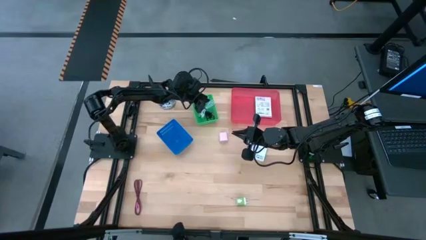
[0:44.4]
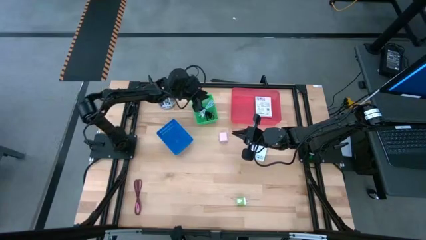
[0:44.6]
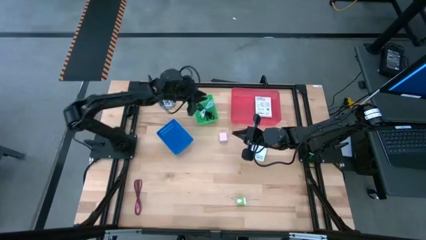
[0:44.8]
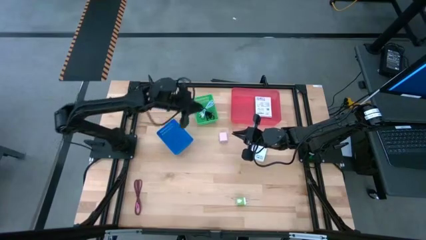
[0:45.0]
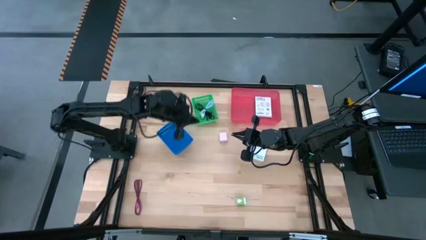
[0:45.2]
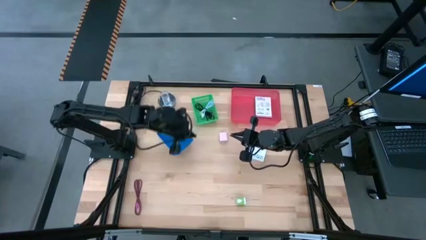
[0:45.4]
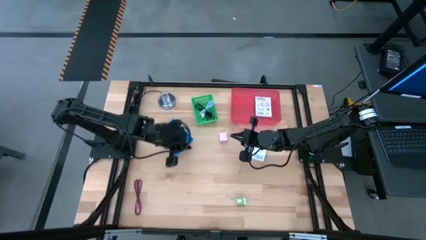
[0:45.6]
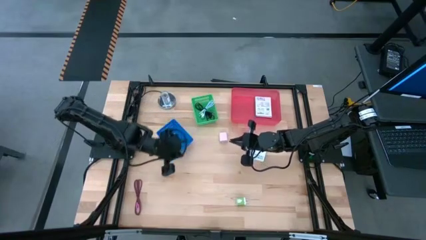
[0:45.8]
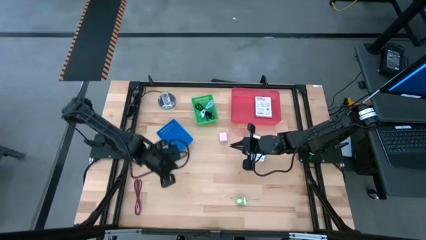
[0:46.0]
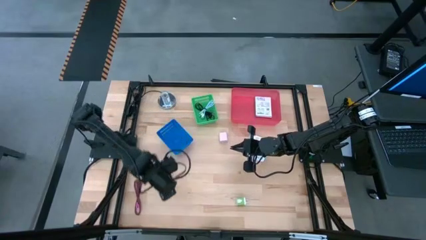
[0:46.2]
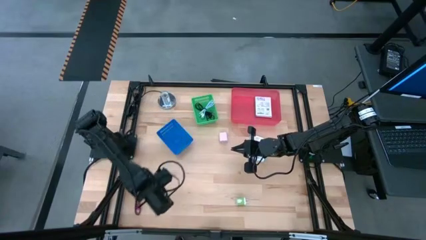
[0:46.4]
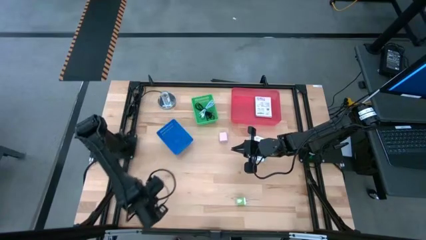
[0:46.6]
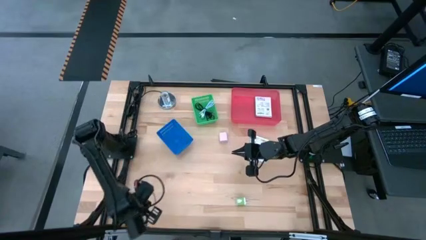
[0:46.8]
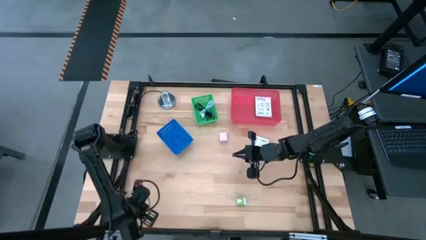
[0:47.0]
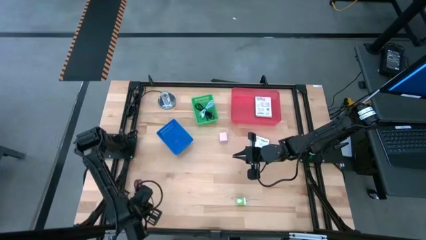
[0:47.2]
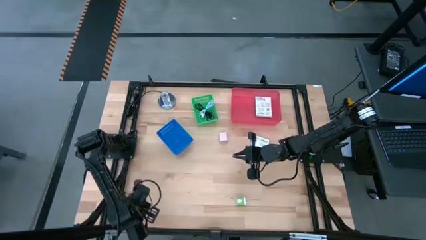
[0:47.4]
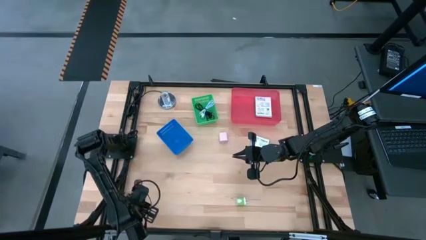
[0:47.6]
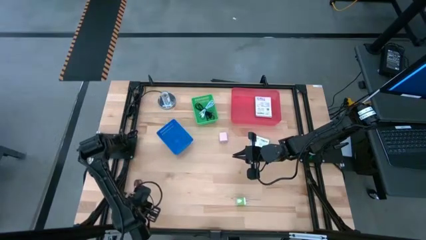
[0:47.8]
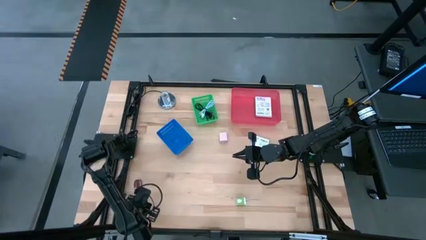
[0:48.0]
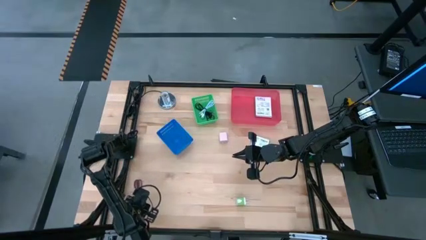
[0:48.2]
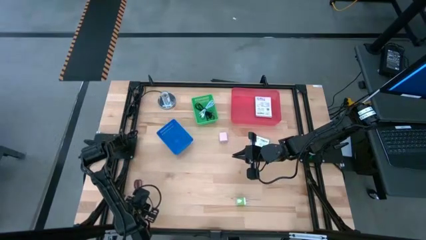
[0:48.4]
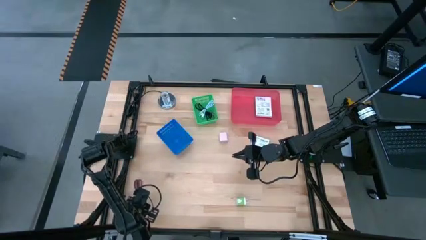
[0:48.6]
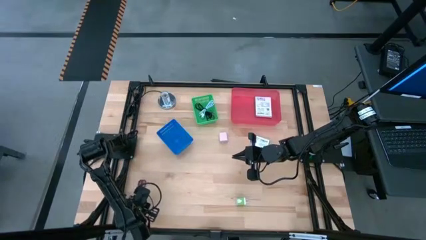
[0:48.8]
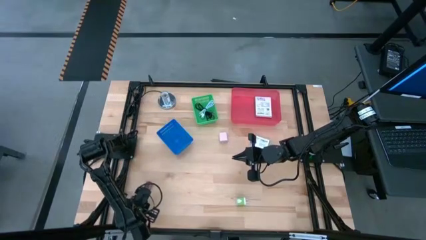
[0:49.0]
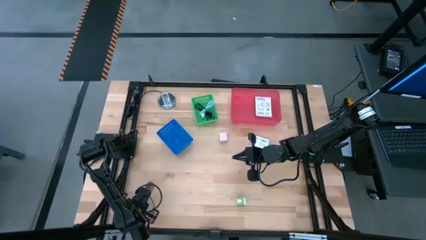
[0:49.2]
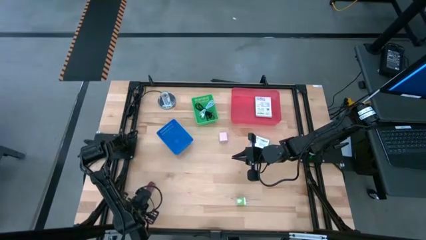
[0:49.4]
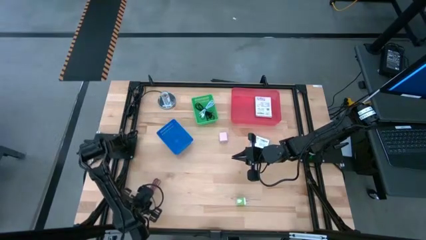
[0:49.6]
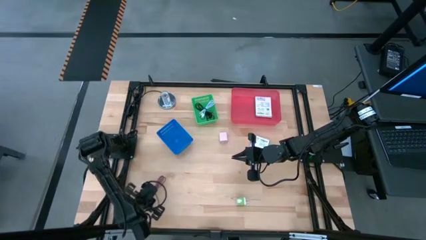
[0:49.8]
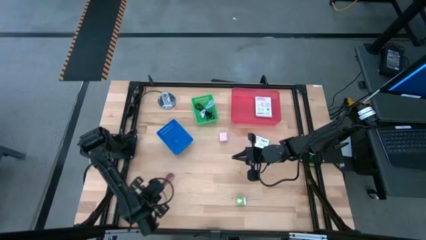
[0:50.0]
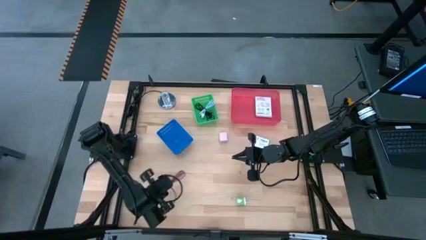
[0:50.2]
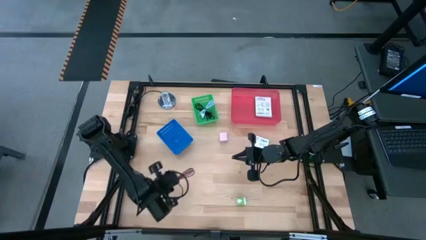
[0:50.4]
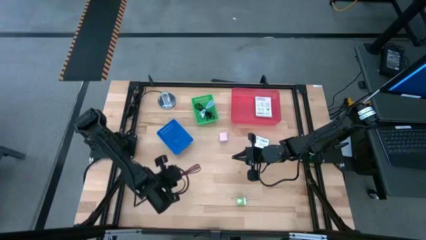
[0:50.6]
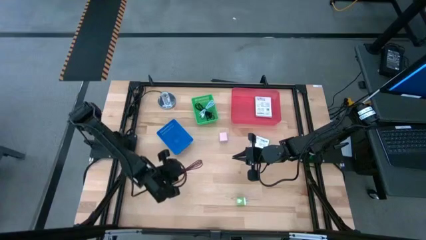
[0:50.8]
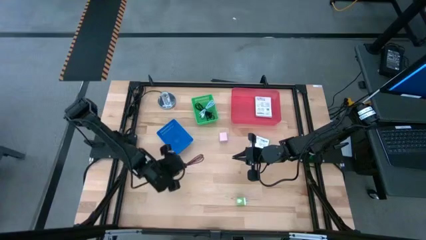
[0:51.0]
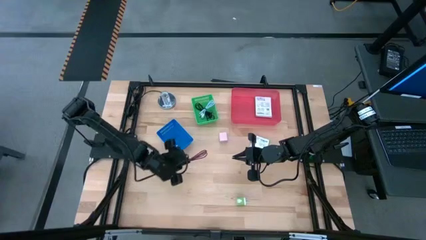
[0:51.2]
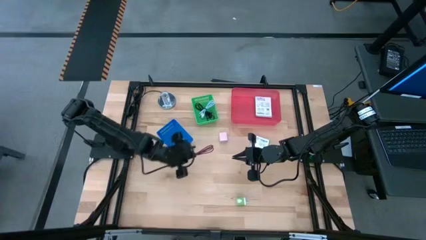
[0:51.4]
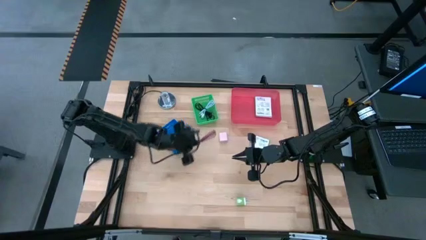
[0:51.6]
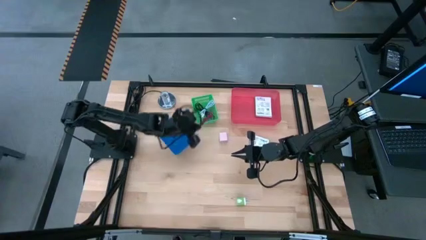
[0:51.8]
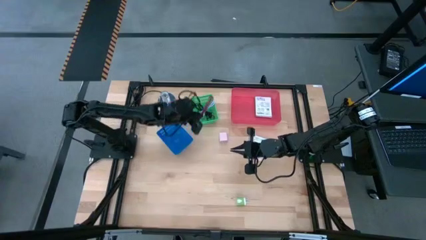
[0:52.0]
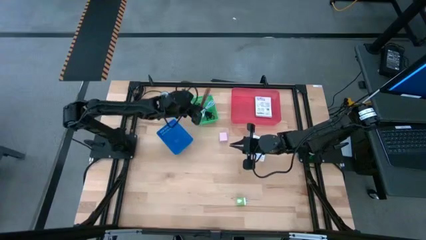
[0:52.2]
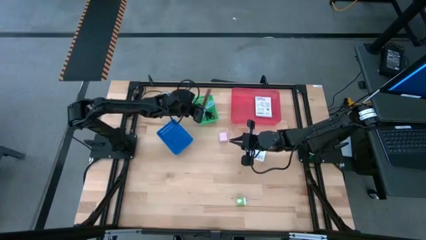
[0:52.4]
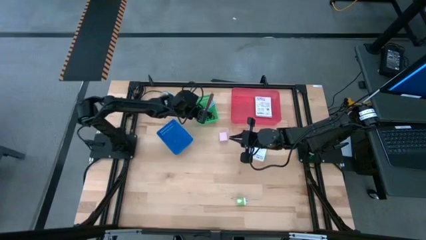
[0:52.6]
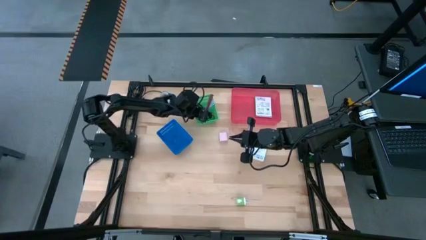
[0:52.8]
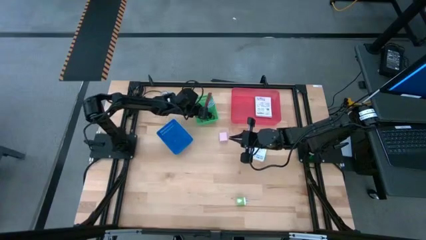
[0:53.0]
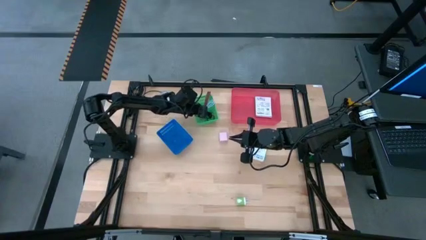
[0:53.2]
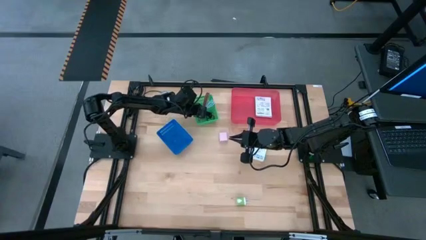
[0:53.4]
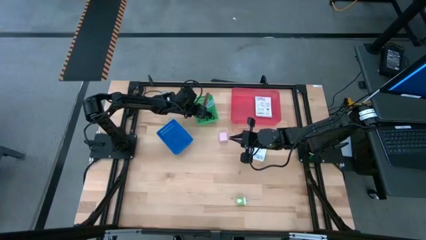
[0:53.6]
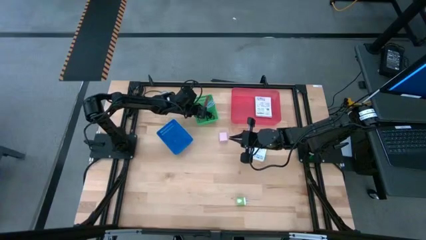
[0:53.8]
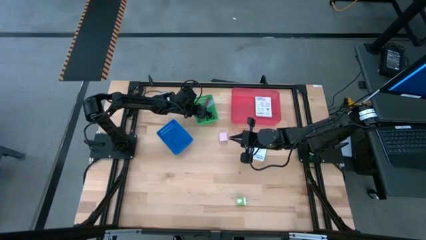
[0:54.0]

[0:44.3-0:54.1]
Task: Pick and place items into bin
Put the pink charger cable into the green bin

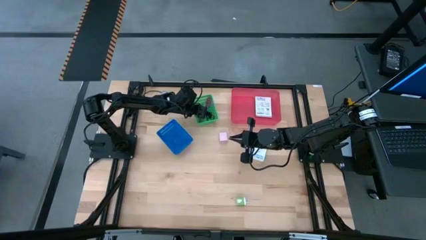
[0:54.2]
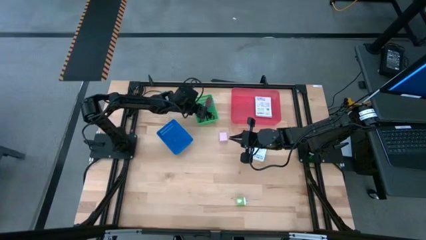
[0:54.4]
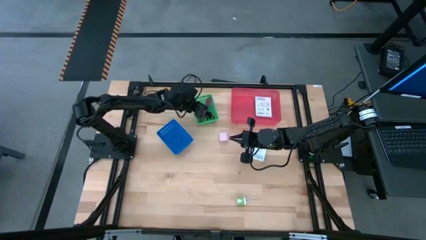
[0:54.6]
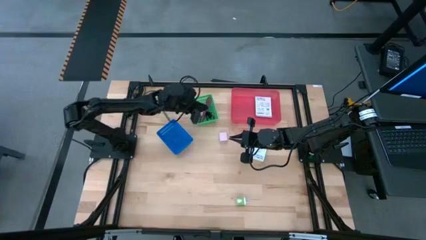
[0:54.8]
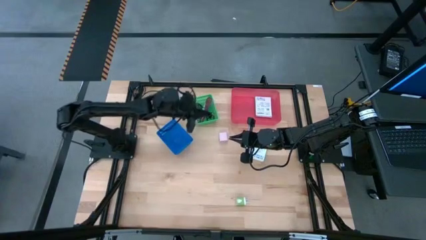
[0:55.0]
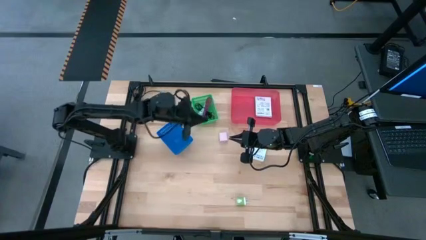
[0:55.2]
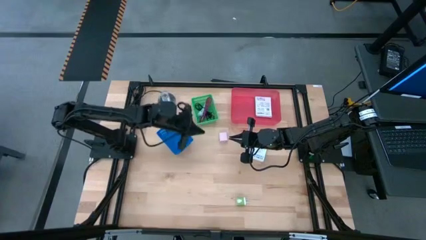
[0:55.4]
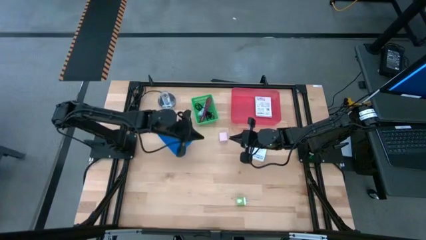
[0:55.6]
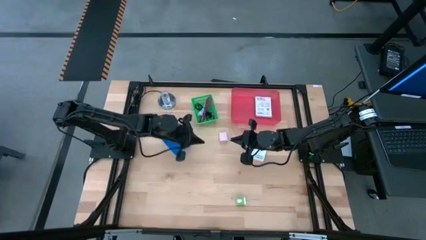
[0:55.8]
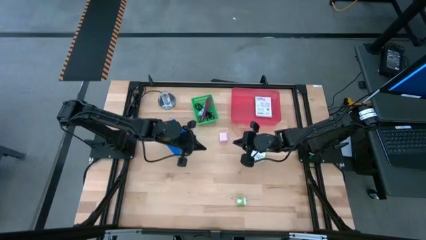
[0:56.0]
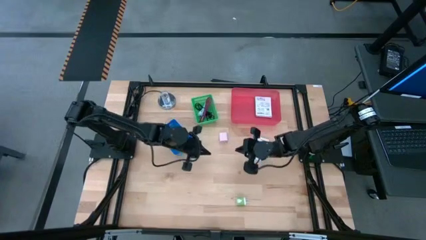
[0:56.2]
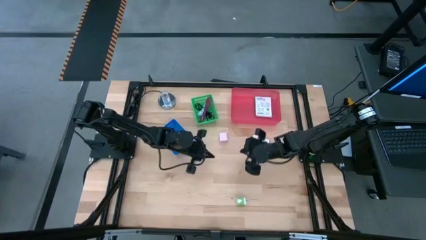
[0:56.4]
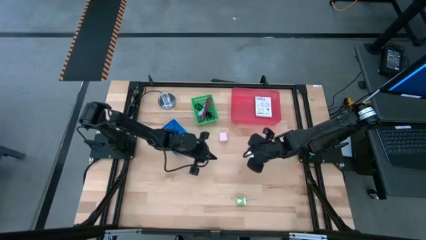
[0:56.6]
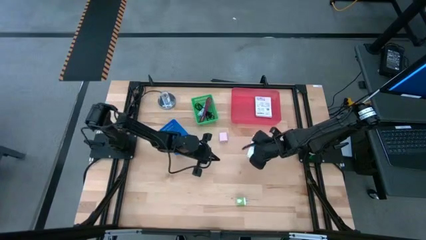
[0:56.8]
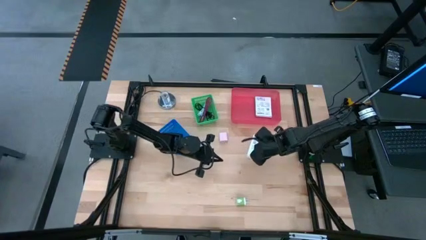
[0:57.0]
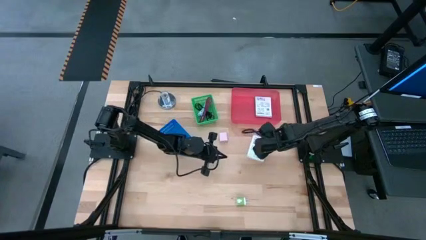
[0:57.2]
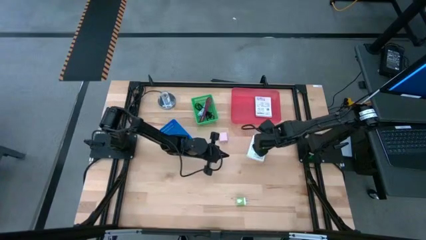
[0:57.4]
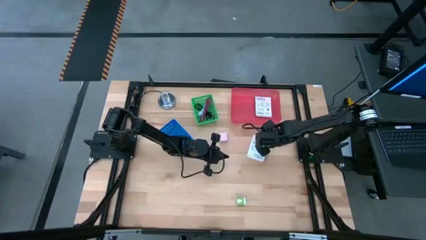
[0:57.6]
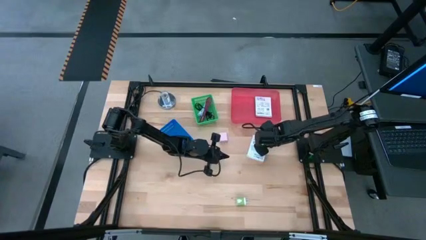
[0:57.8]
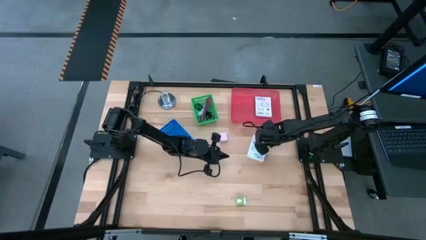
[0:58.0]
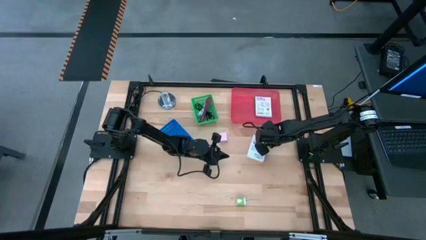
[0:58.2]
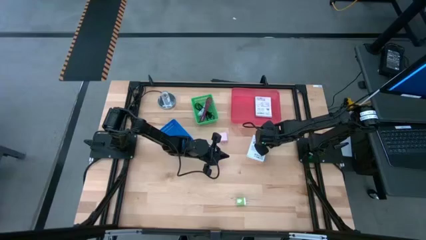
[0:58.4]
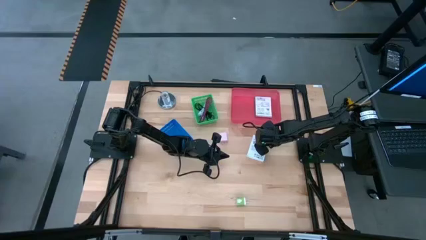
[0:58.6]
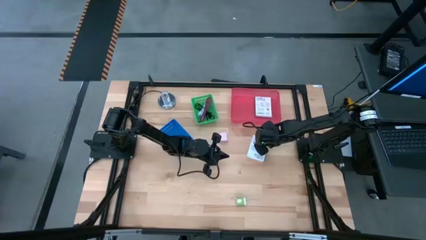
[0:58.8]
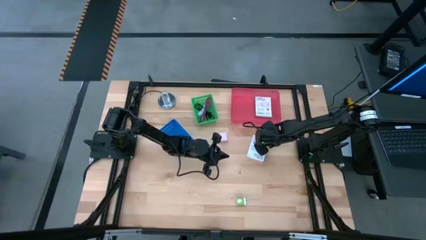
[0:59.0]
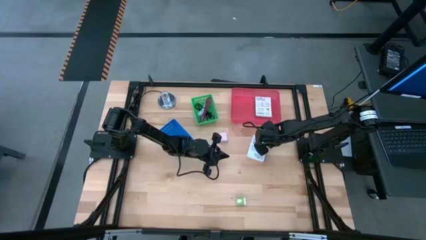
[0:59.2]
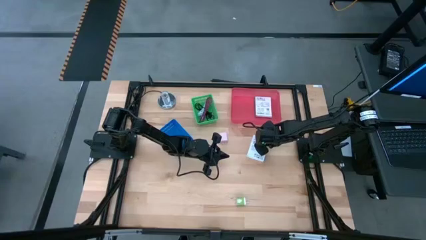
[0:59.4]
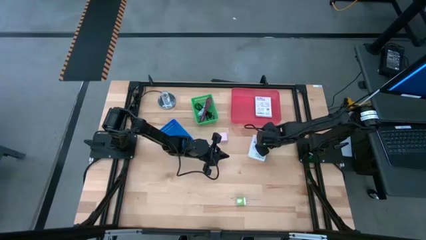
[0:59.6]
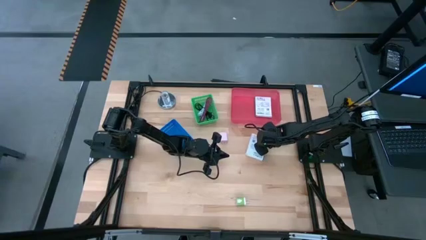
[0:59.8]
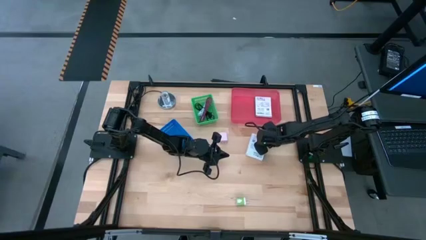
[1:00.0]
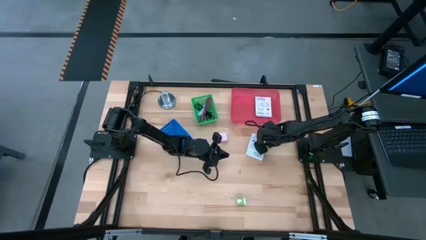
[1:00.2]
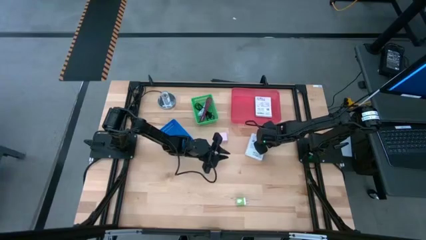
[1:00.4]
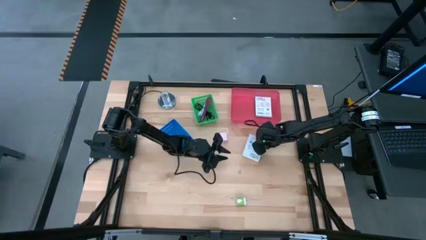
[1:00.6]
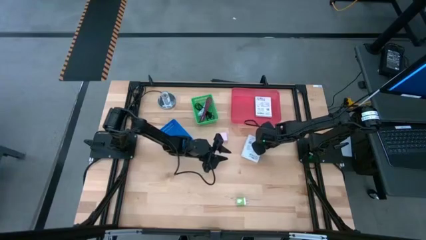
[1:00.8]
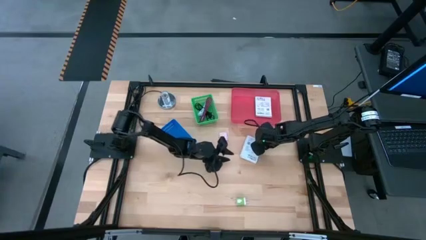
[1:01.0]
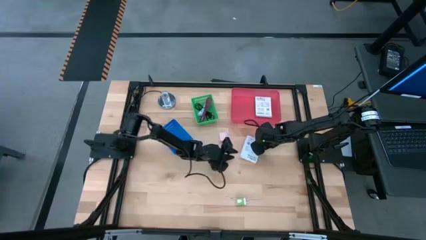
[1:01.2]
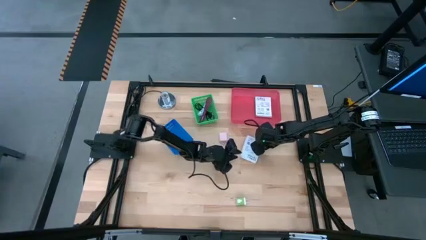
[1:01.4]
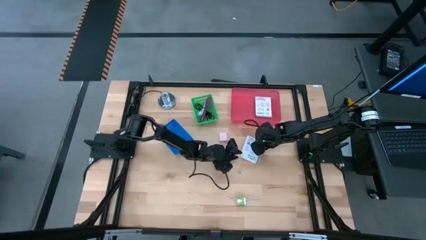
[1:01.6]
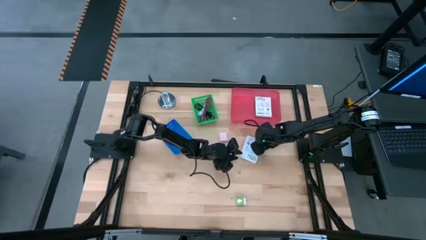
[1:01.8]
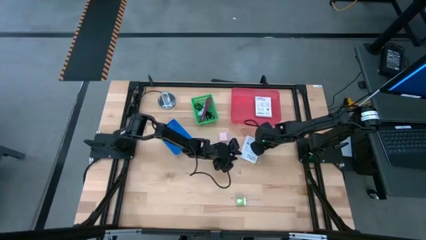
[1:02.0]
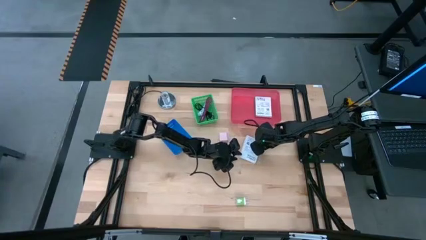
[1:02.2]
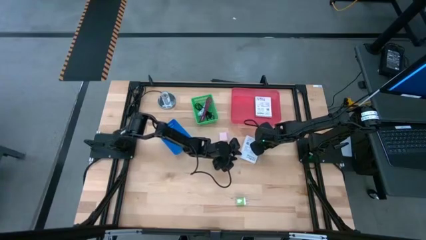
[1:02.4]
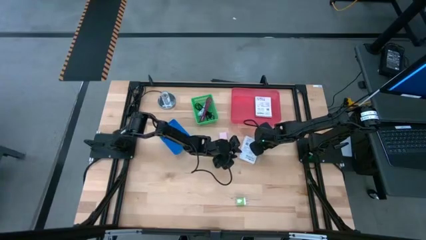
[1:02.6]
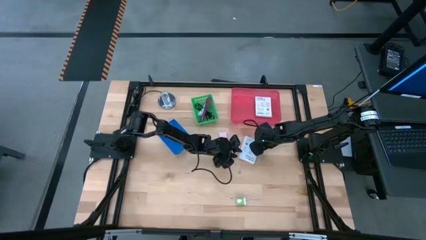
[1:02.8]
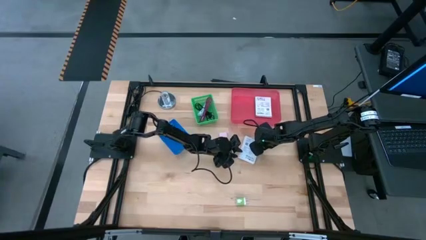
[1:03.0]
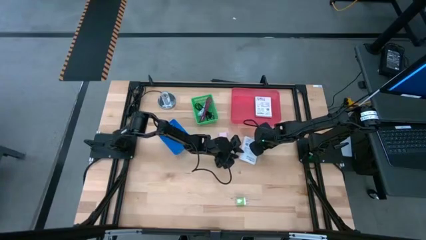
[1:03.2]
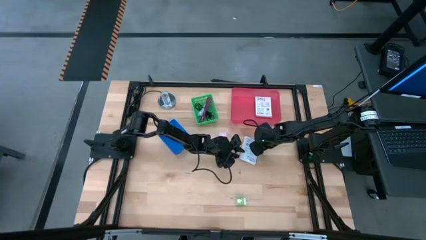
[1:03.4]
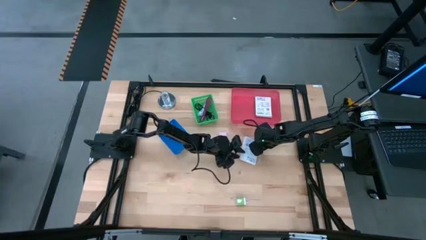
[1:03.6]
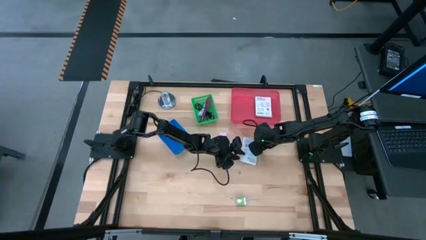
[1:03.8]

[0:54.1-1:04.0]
Put the white card reader box into the pink bin
